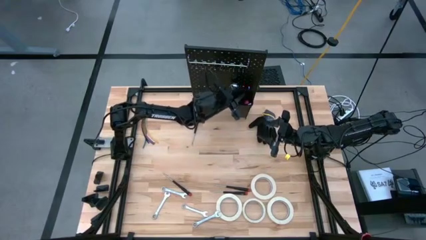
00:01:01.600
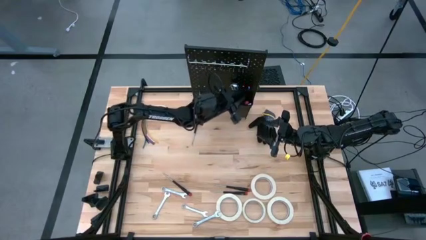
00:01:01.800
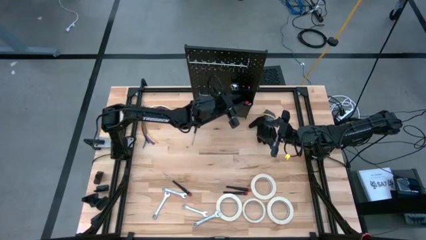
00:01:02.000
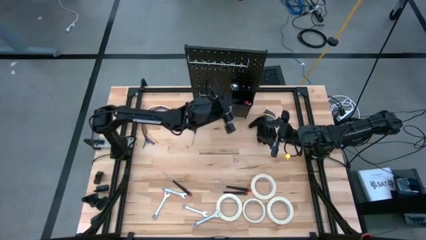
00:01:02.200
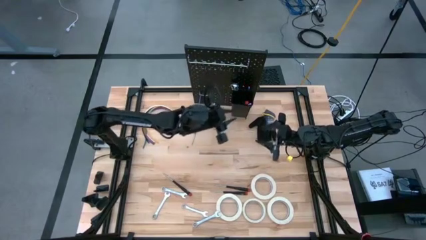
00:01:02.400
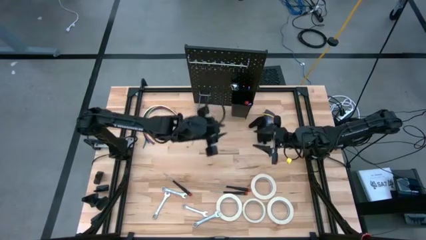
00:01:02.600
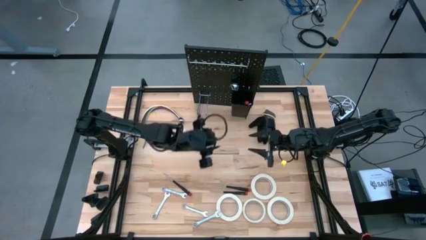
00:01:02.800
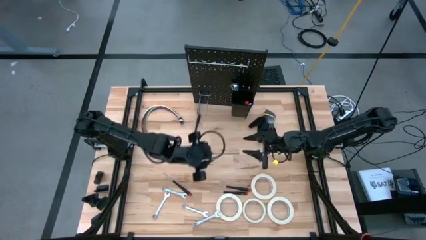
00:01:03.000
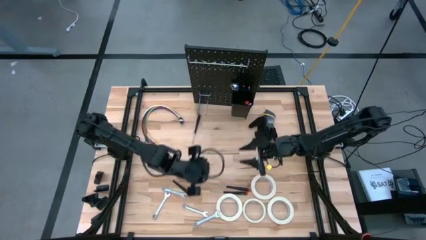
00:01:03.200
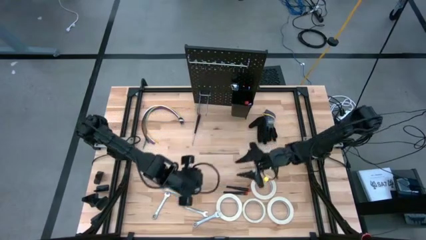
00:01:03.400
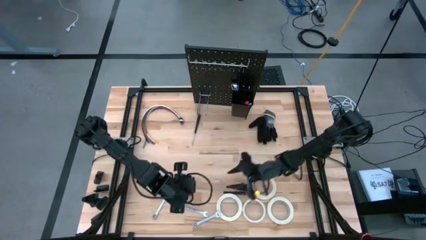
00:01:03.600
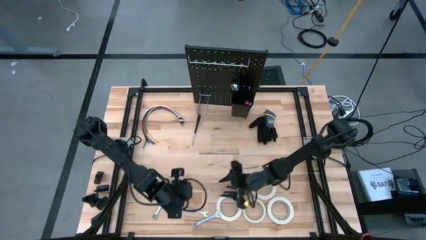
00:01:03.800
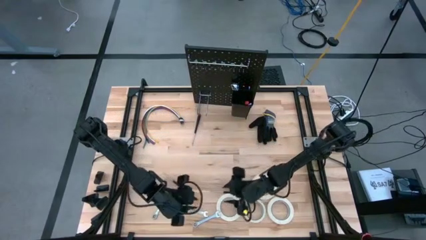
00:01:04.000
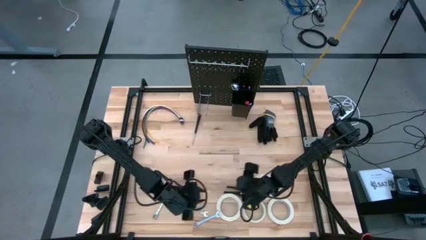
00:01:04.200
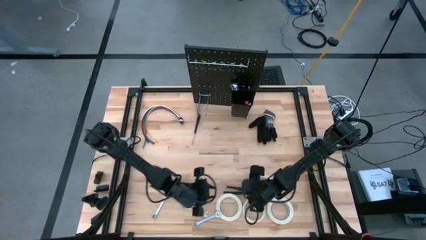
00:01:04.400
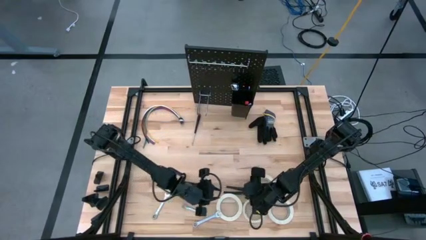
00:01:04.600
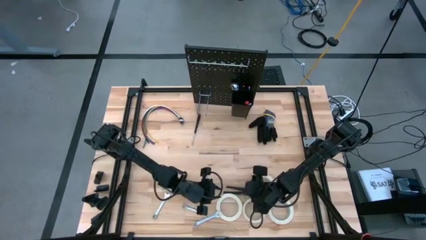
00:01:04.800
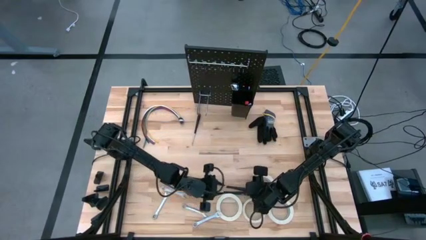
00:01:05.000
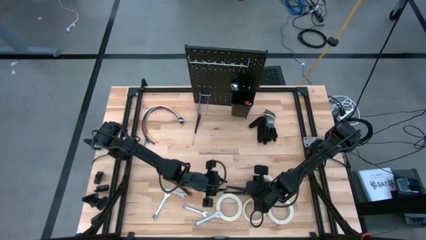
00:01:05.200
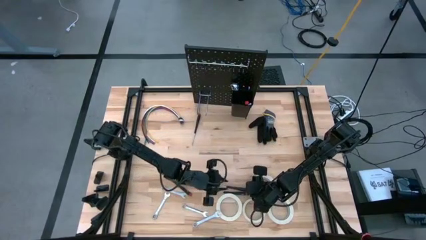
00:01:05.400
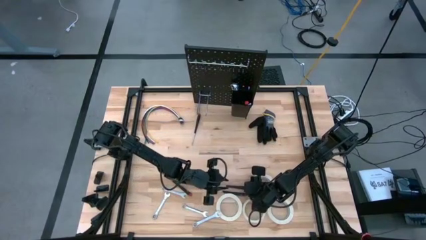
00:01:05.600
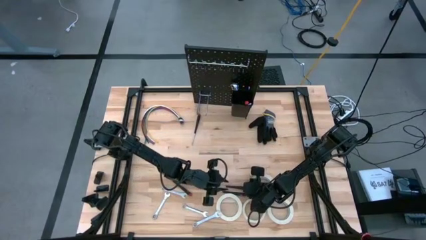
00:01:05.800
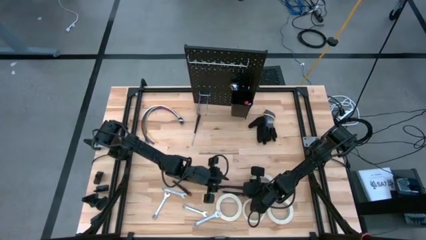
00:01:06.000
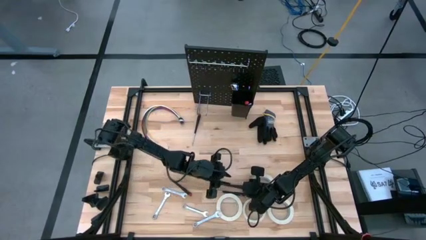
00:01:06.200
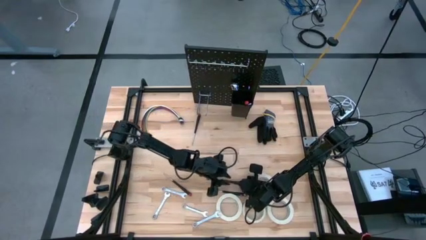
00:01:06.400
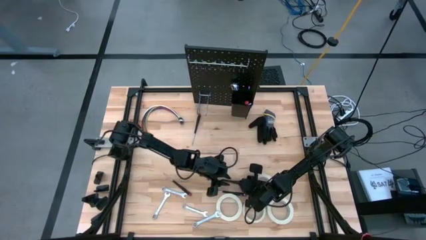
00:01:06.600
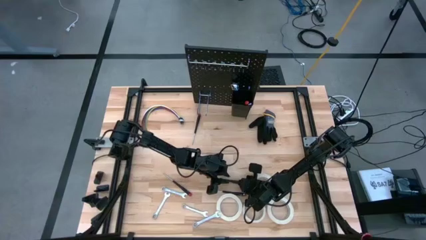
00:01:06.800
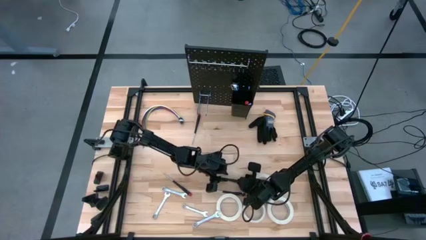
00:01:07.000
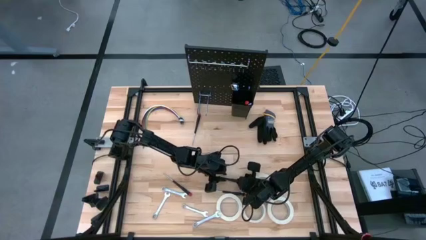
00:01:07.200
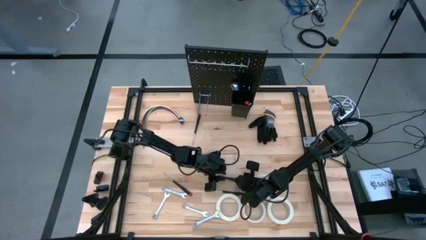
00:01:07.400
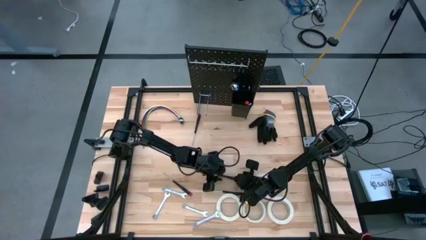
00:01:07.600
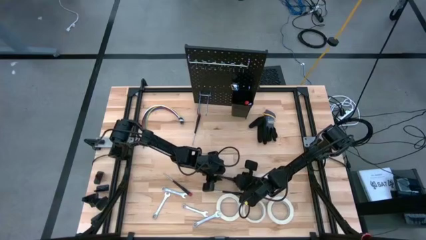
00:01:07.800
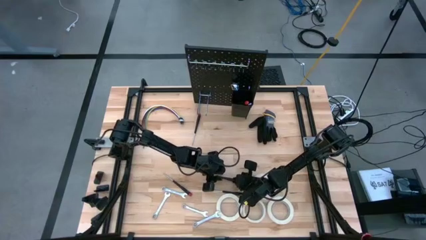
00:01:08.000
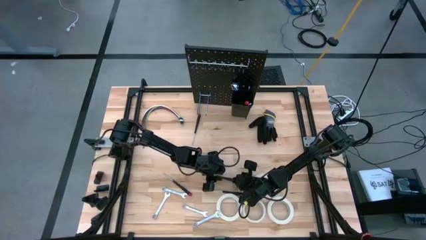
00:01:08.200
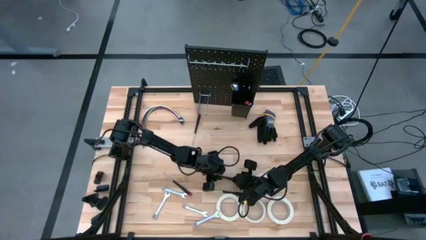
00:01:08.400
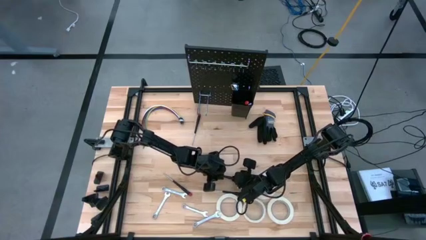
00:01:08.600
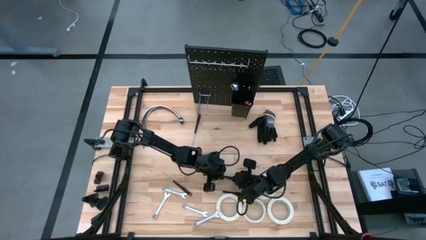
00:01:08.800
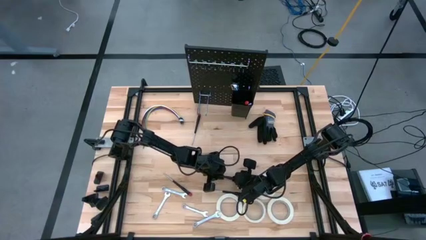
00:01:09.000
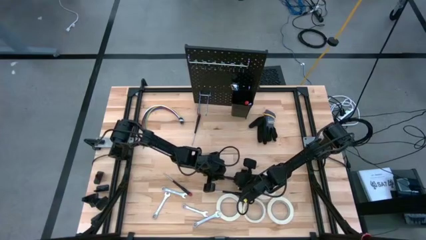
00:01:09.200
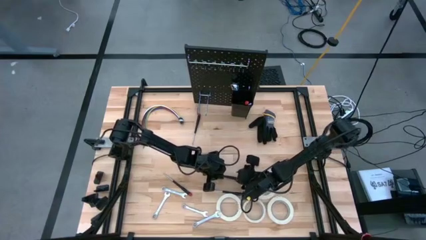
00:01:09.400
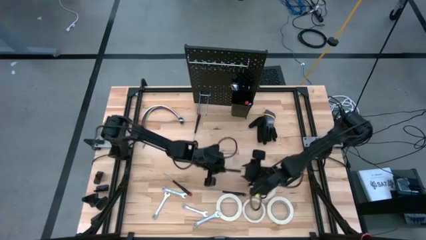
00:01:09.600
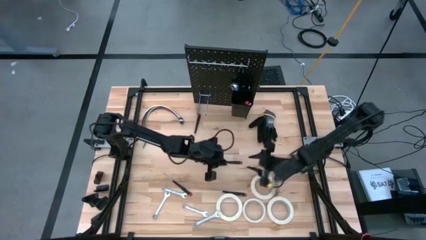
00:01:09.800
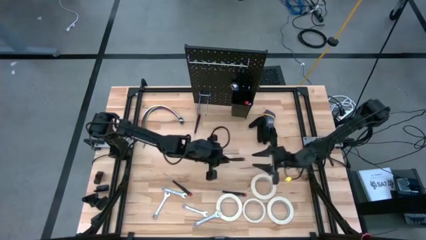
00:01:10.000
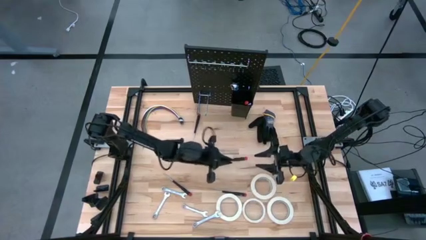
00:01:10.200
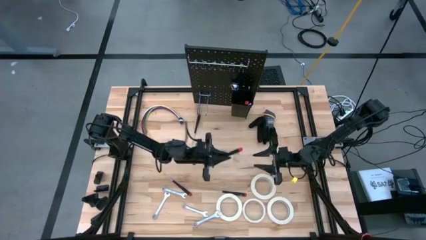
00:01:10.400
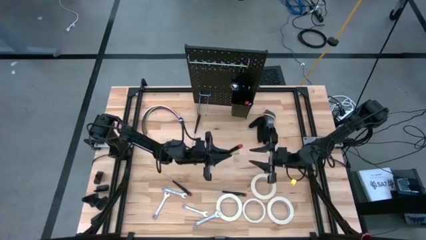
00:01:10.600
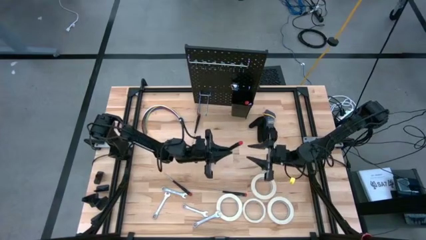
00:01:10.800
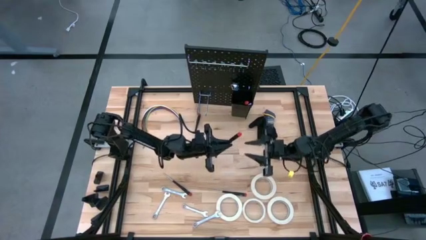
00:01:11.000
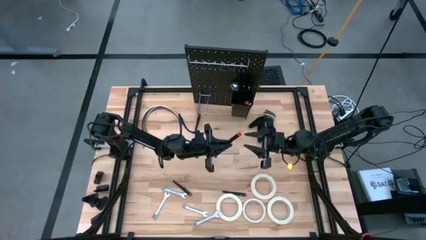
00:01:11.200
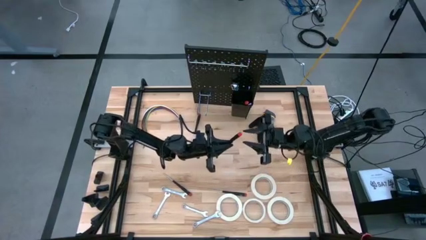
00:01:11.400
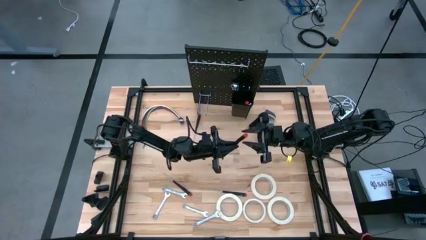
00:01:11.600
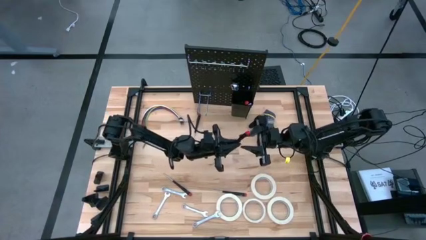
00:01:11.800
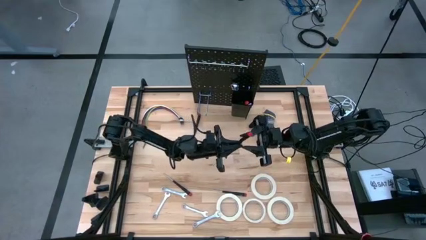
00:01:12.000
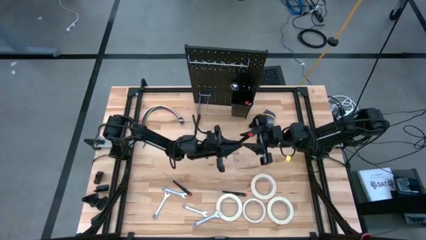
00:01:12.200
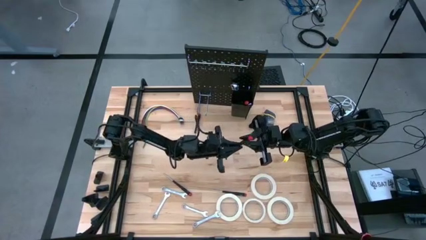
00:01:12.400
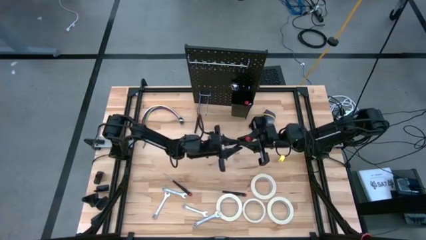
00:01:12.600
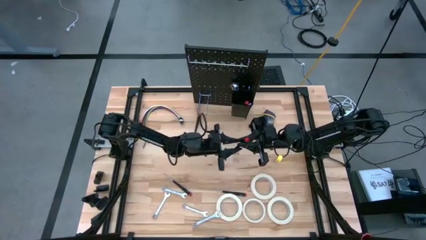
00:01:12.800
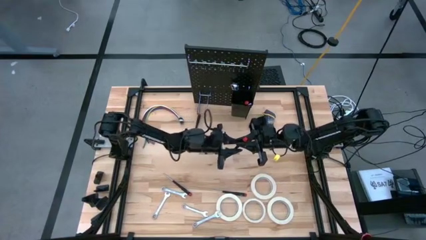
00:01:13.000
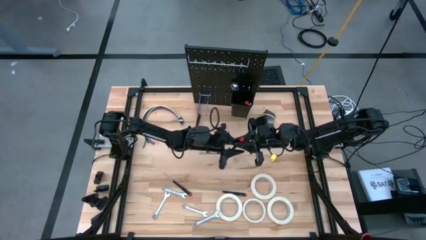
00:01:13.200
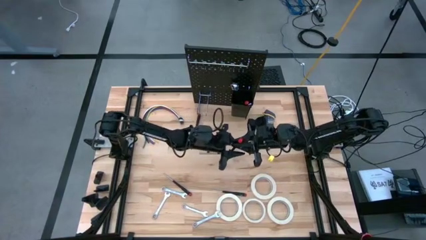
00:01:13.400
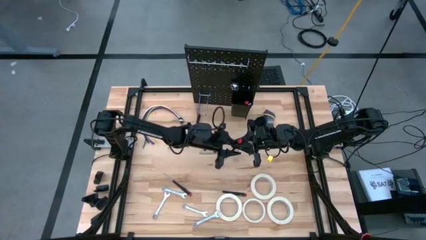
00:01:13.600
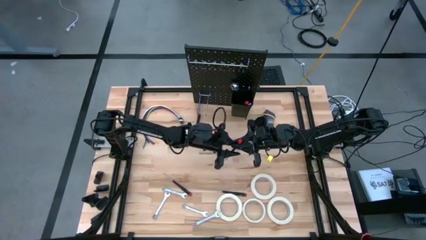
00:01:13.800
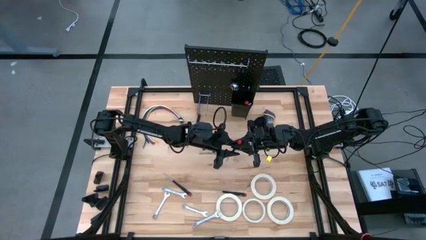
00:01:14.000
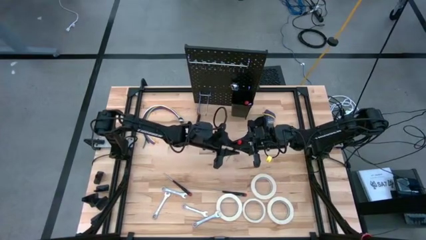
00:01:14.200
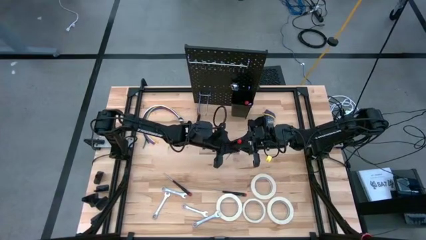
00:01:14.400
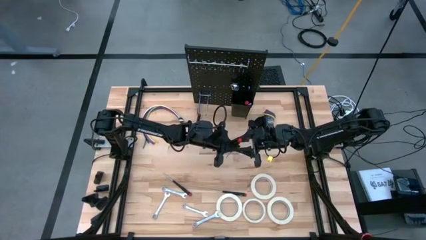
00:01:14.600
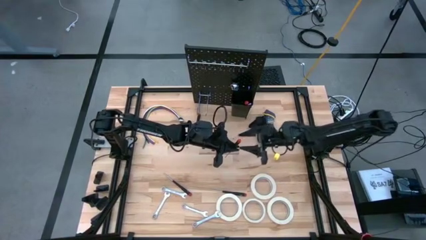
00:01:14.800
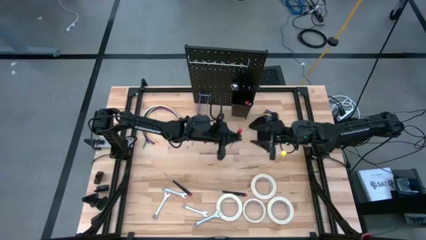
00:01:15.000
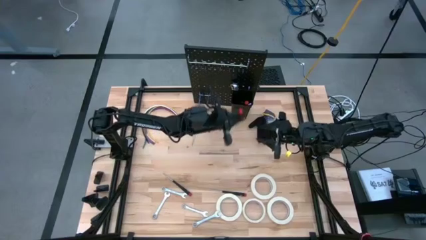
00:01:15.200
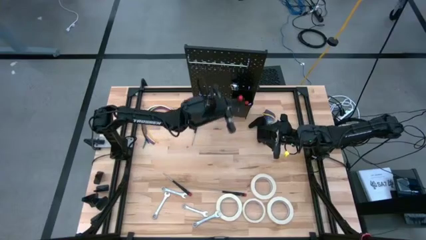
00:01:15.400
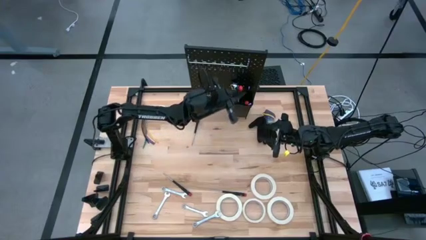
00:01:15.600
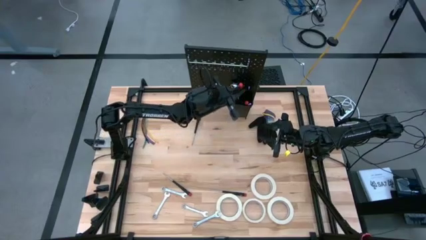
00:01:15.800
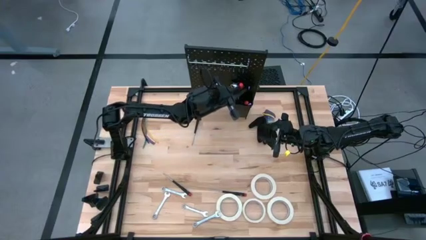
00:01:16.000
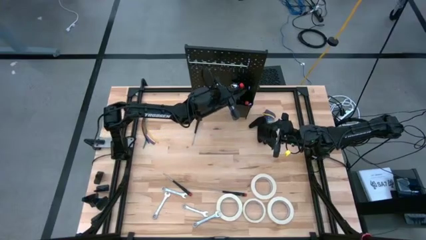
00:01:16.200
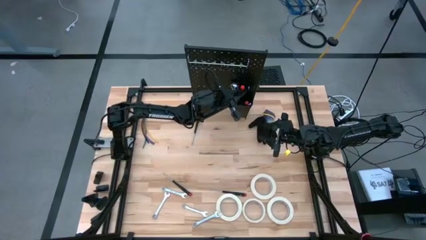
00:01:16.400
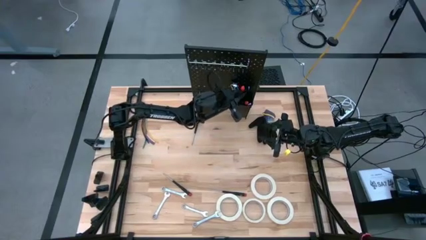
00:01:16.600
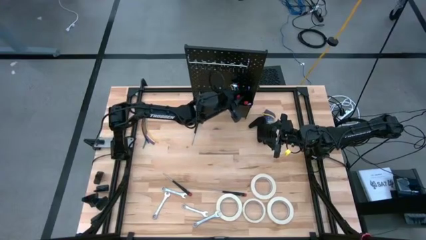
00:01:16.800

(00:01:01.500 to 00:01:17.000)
Task: Hang tools onto peg board
Put the black nut driver into the black bin on the peg board

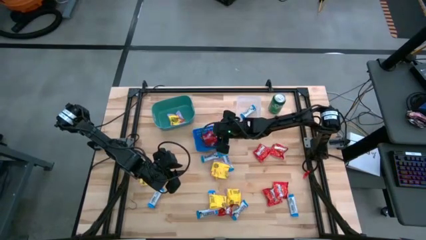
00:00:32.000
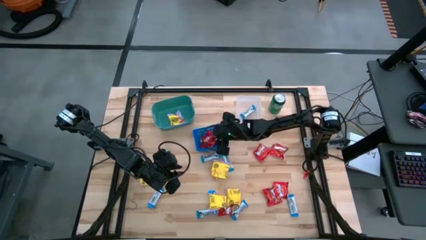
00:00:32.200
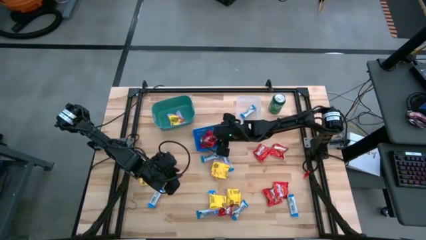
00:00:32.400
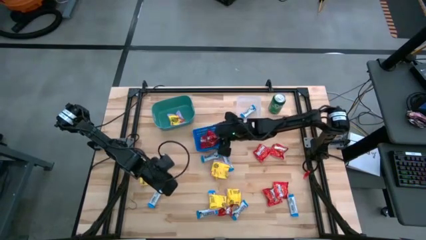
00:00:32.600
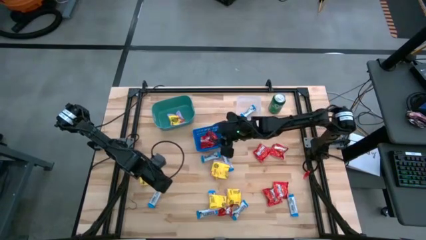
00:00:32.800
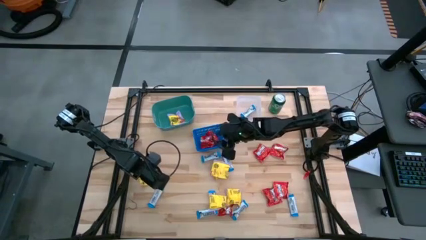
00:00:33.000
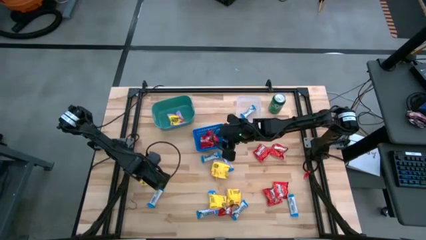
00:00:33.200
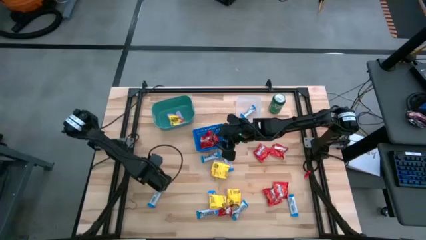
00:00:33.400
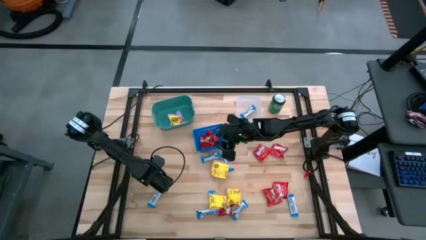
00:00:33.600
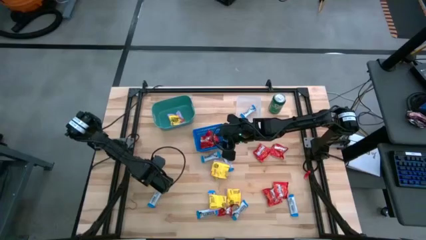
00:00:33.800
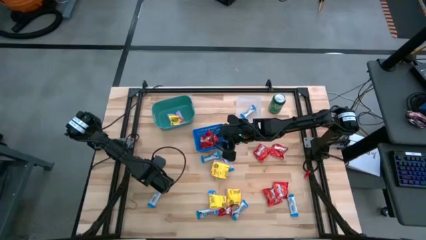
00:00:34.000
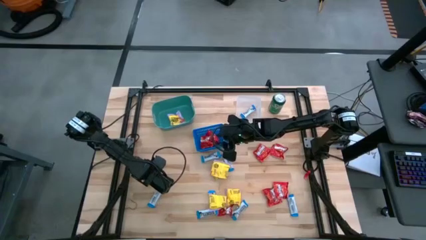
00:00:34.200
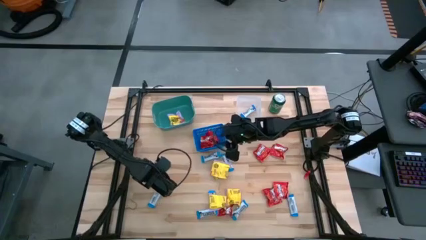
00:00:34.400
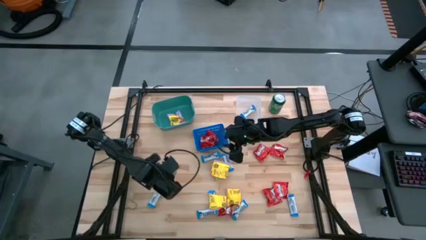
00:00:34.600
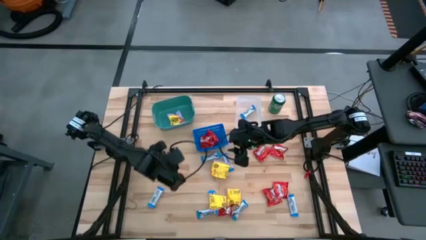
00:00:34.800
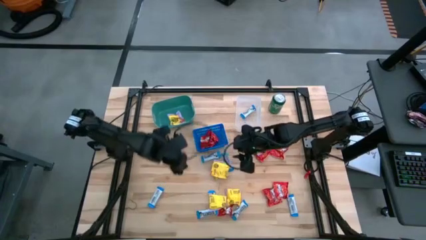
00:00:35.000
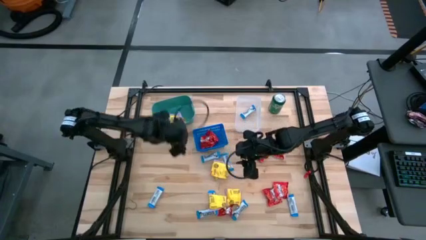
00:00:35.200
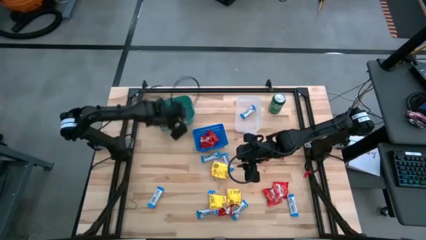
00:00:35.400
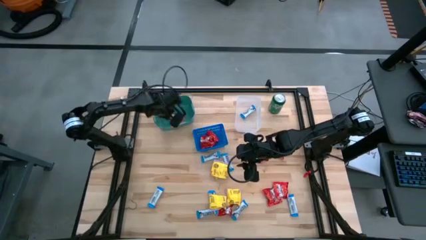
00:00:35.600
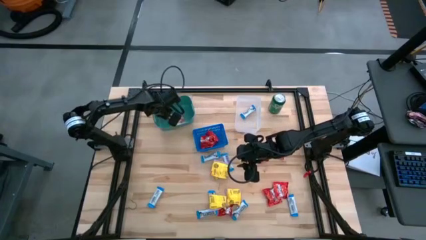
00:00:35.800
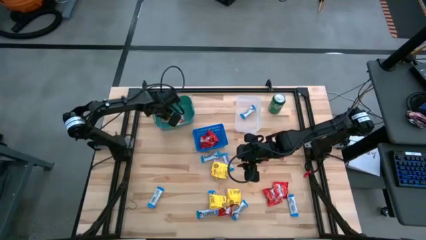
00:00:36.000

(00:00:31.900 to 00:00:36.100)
Task: Sort candy
Put the sour patch candy into the blue green bin
